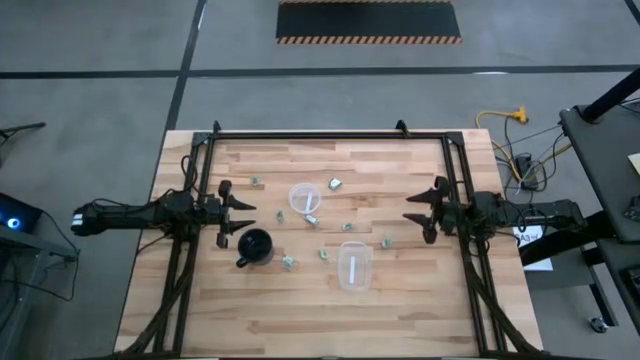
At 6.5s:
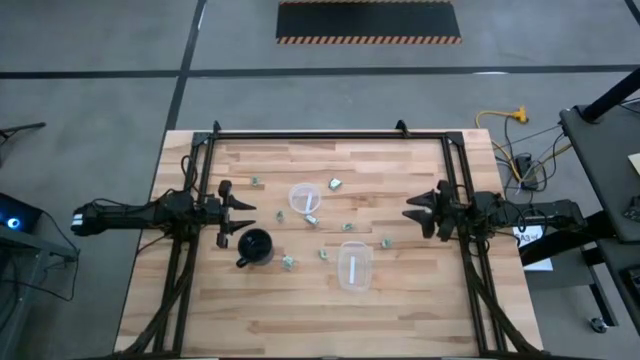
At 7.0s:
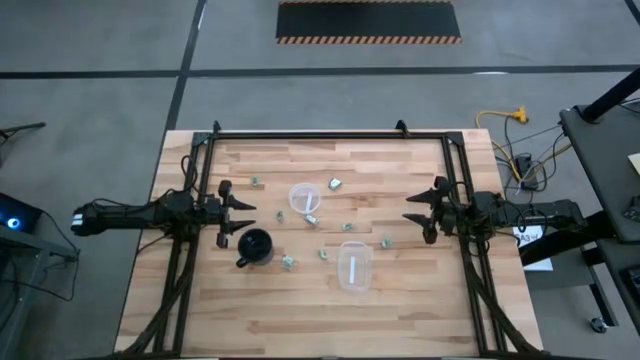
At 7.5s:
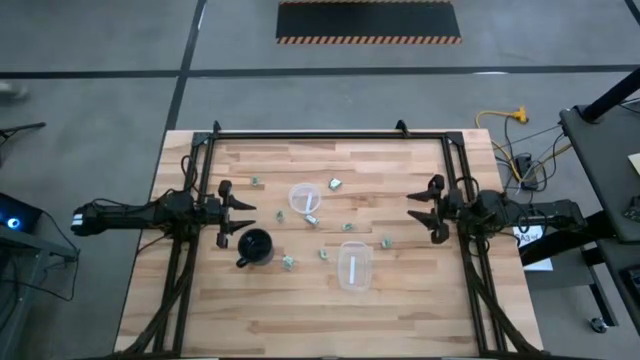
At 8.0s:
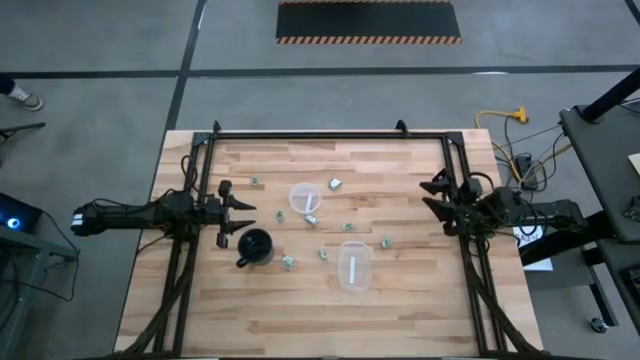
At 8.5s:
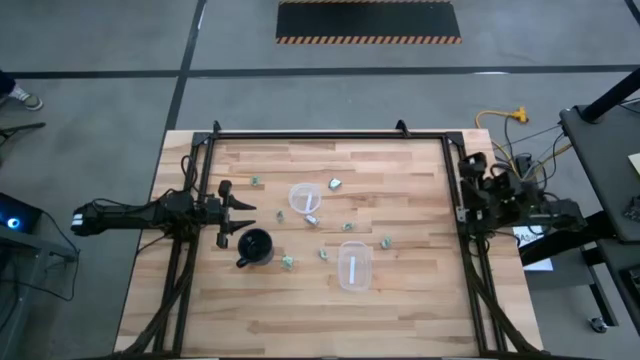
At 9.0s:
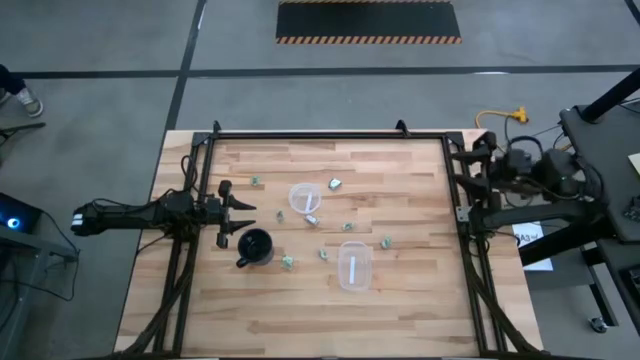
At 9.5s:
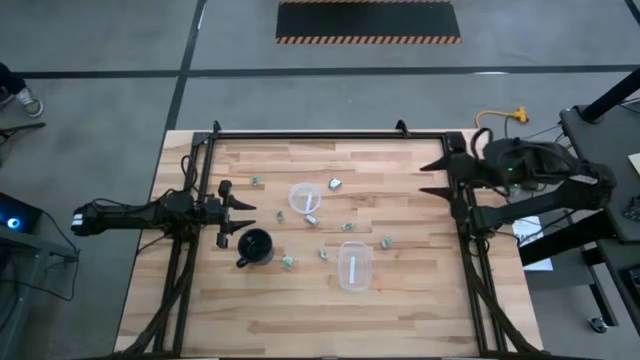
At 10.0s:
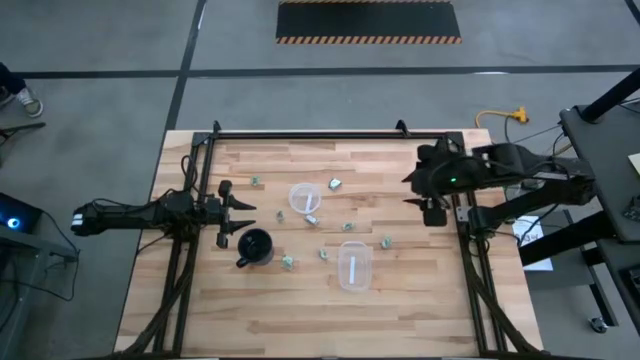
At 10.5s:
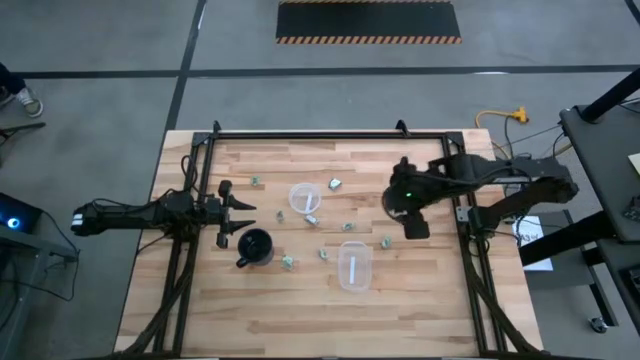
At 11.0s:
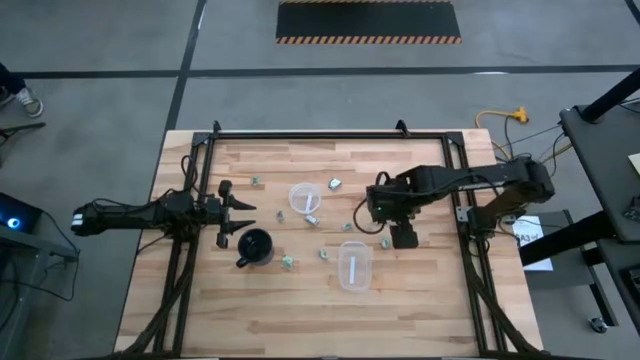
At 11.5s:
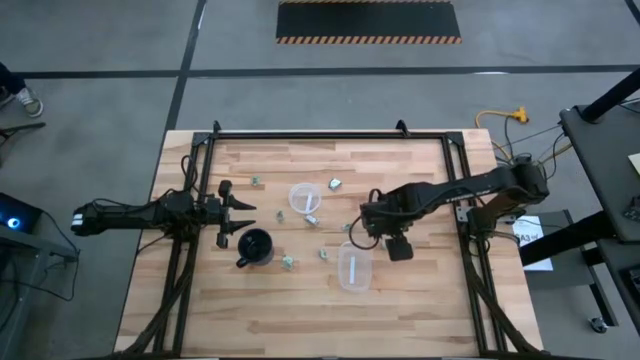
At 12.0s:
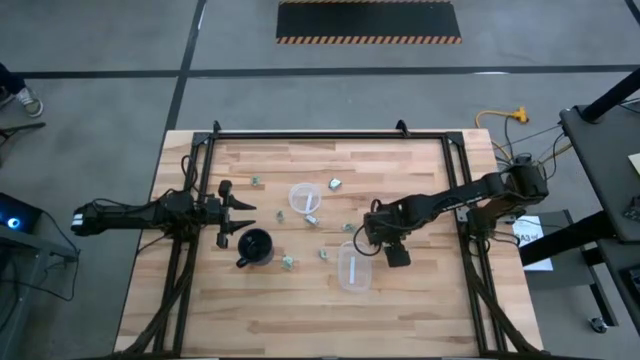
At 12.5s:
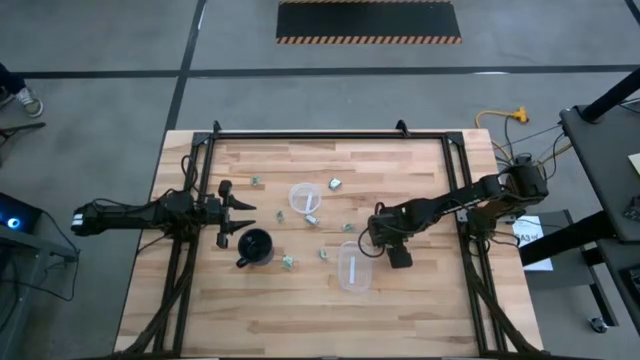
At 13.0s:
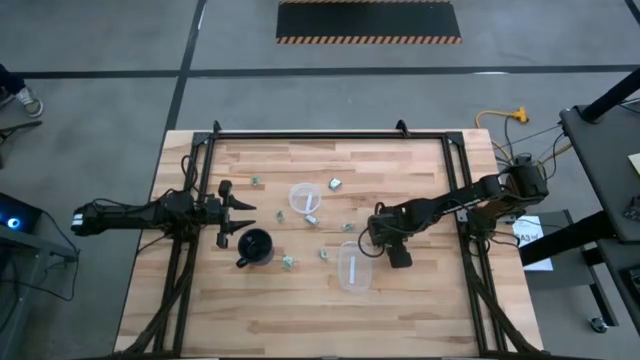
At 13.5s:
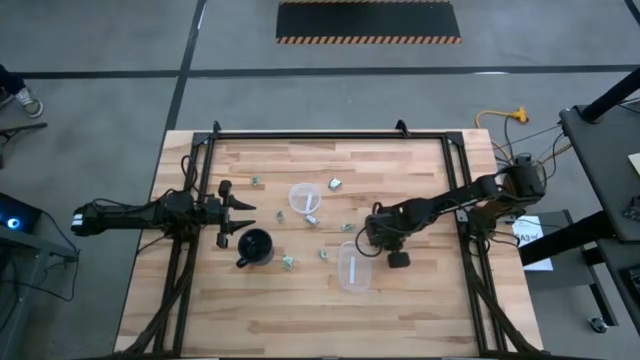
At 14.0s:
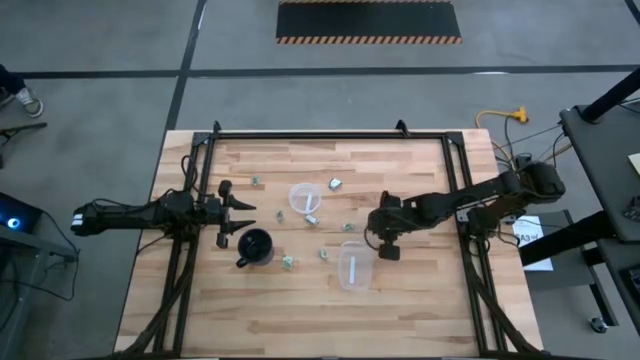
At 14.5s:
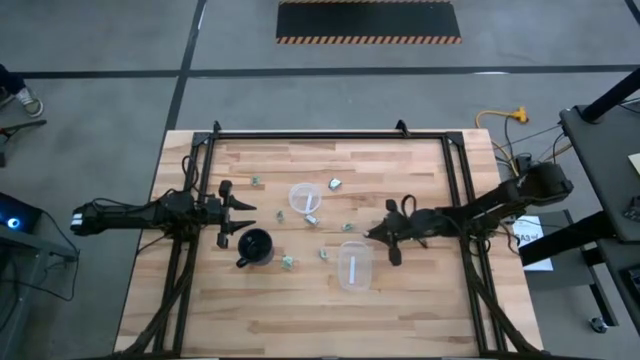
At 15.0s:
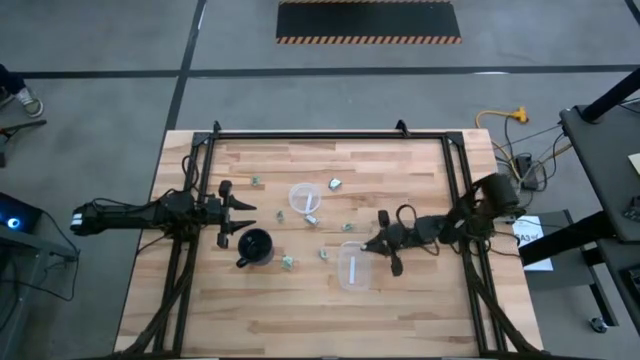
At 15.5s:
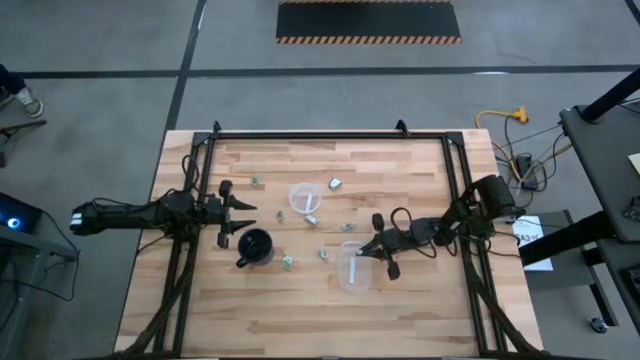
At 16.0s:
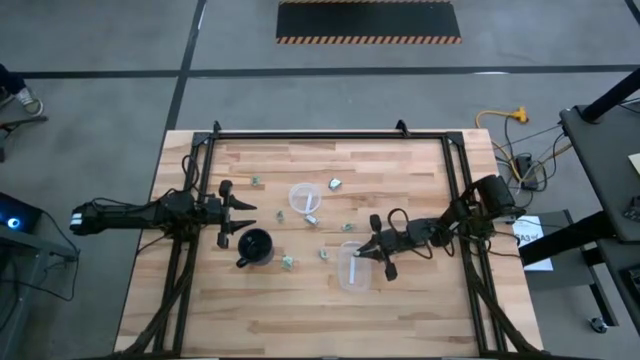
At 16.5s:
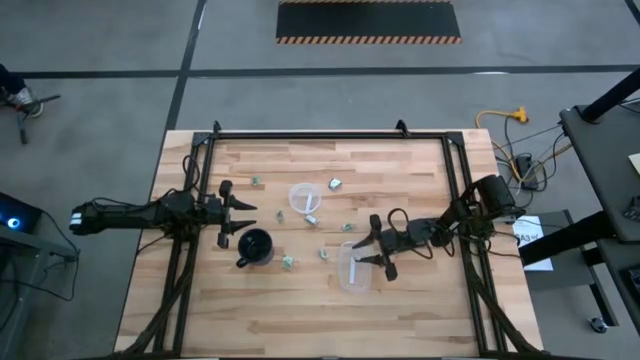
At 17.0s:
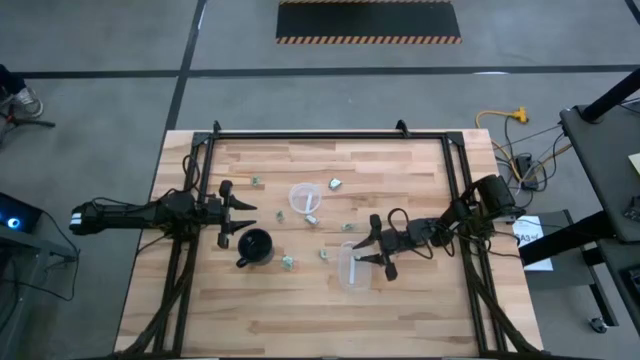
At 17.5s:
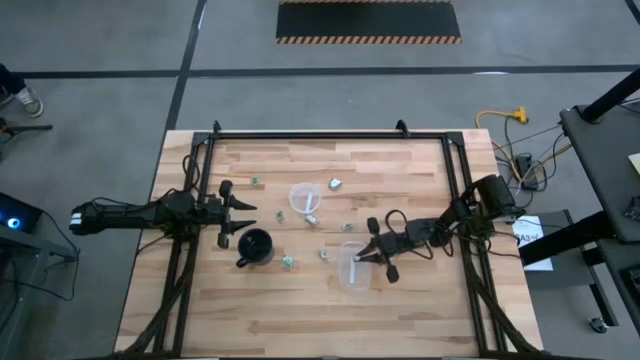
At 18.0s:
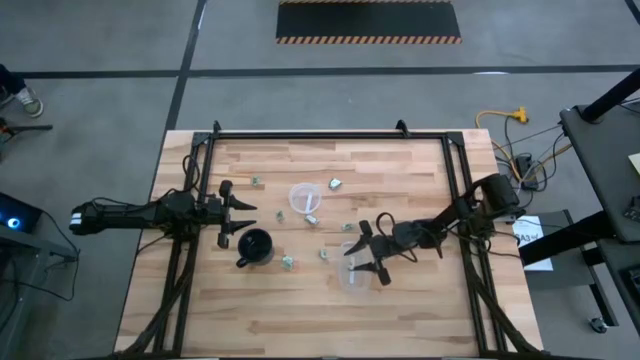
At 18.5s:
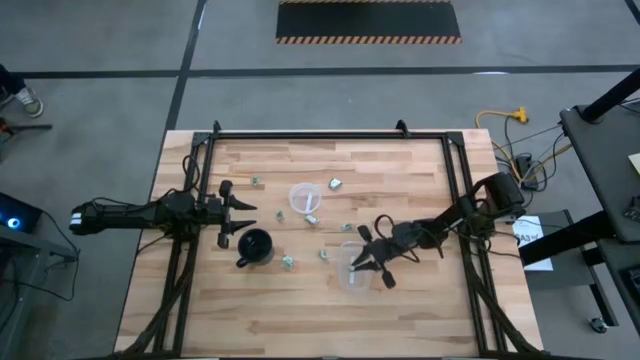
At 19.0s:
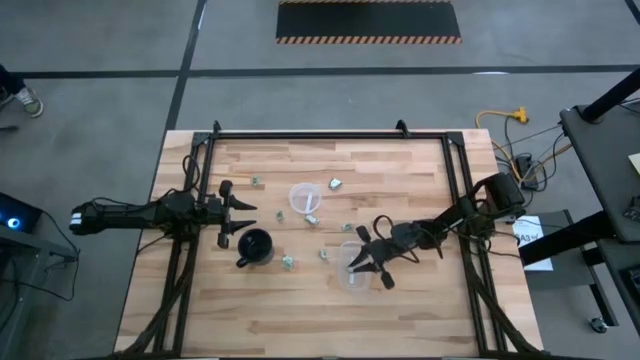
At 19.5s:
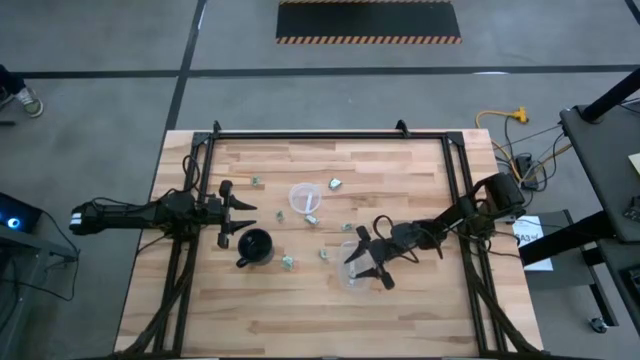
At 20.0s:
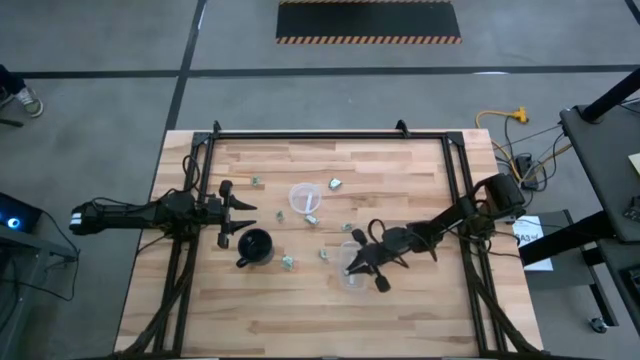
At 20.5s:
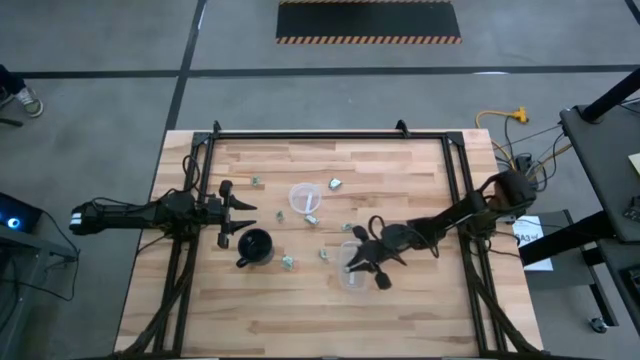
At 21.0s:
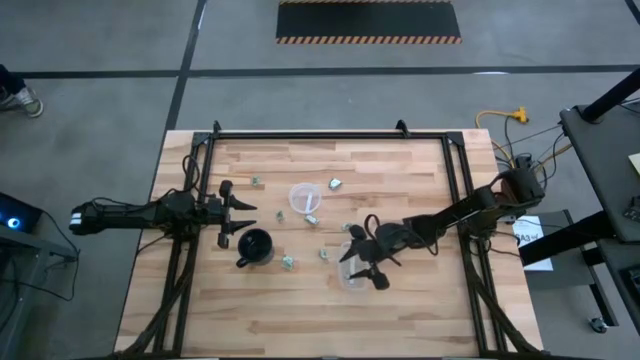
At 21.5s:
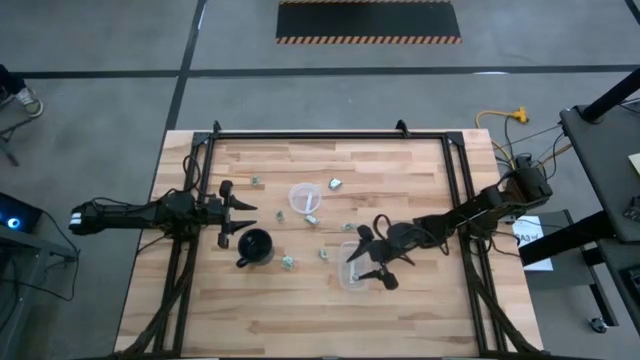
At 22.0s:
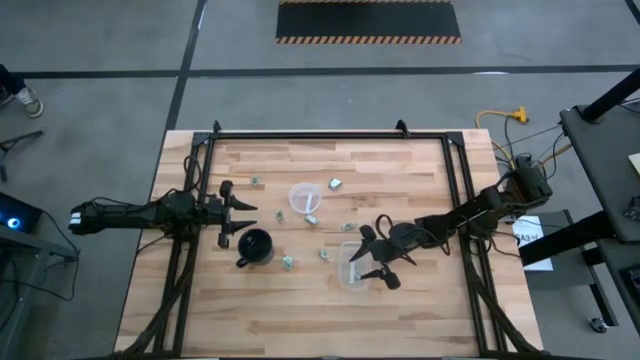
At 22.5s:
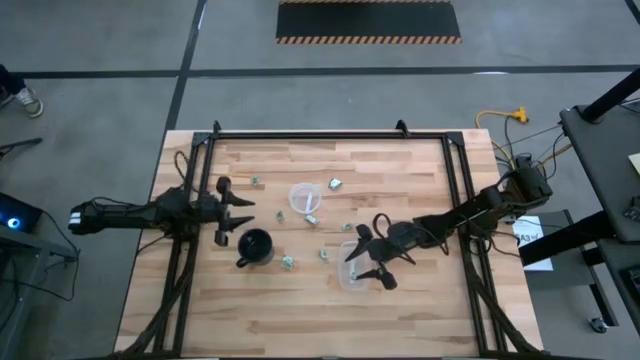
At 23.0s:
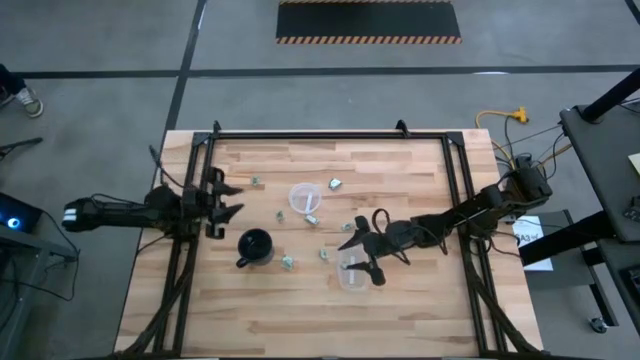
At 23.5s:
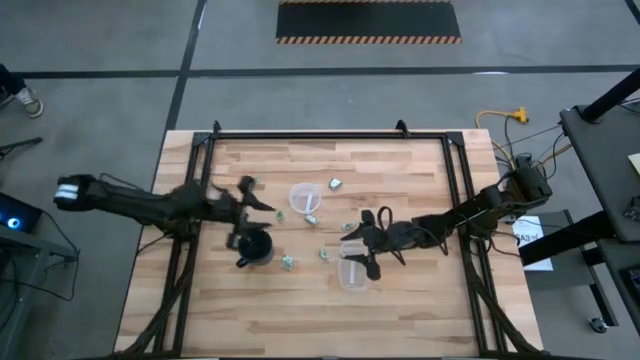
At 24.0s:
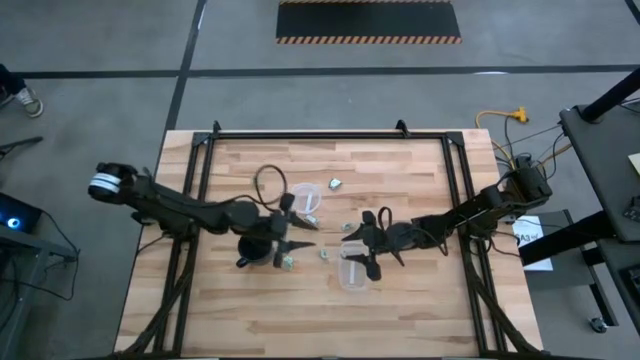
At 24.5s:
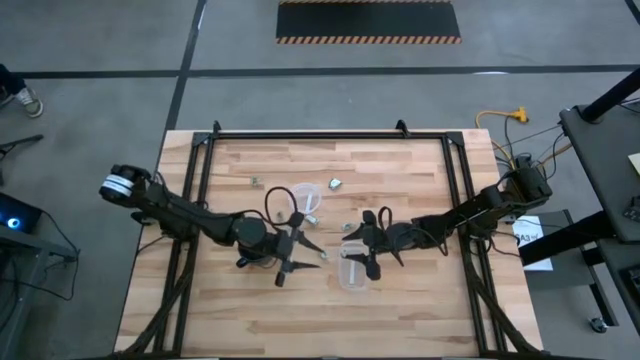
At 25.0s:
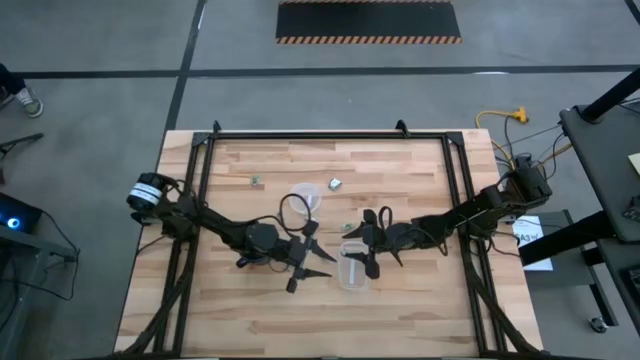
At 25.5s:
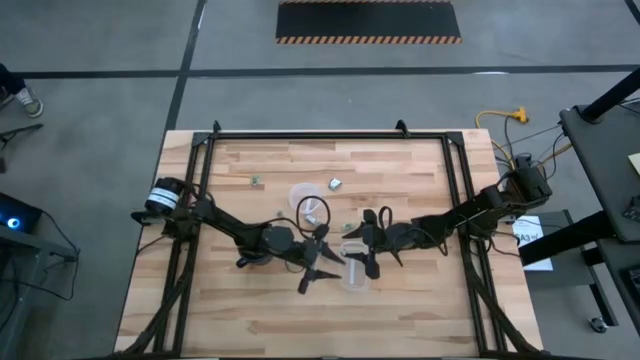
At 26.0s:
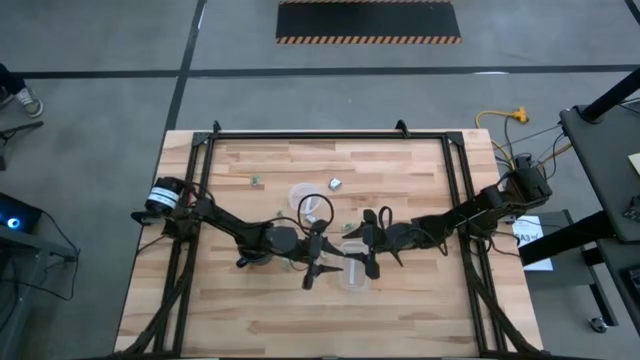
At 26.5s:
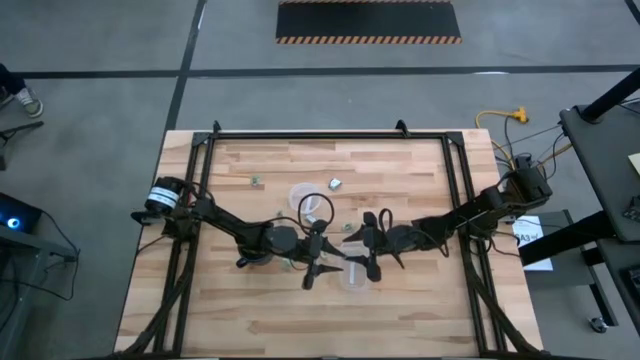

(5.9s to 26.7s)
Task: Pick and place items into bin
Put the stevia packet into the rectangular transparent bin
